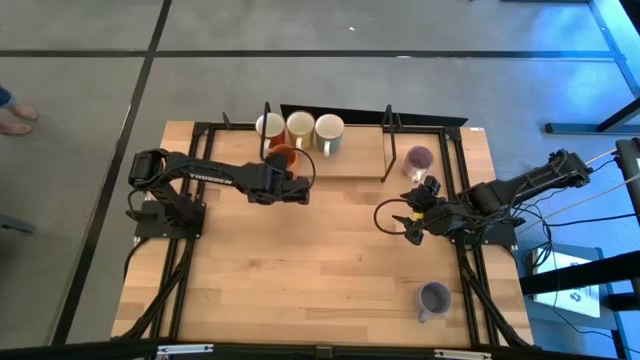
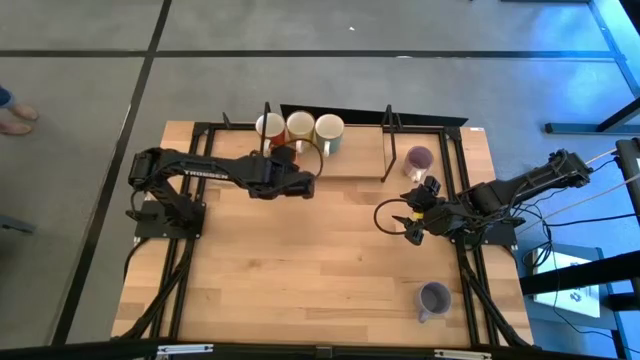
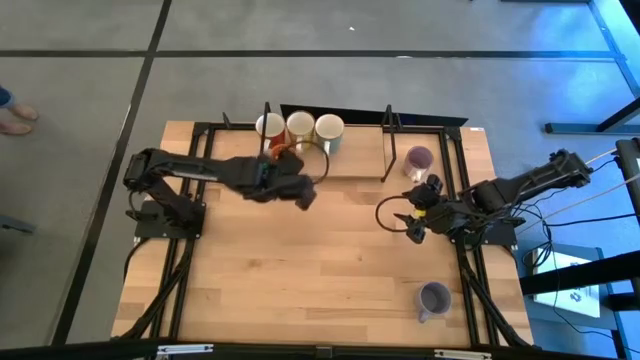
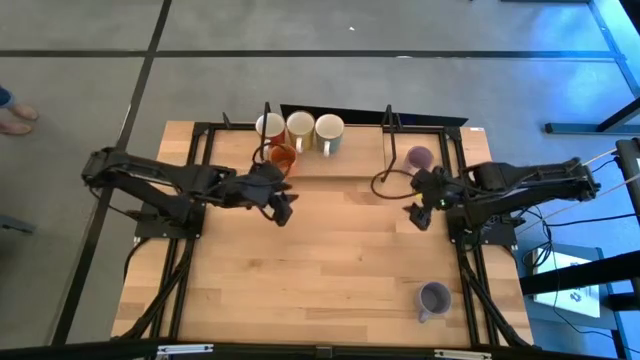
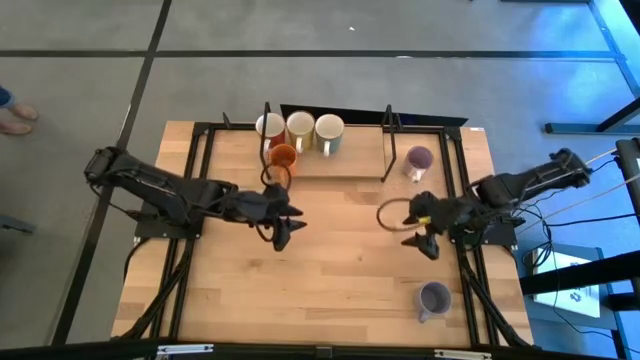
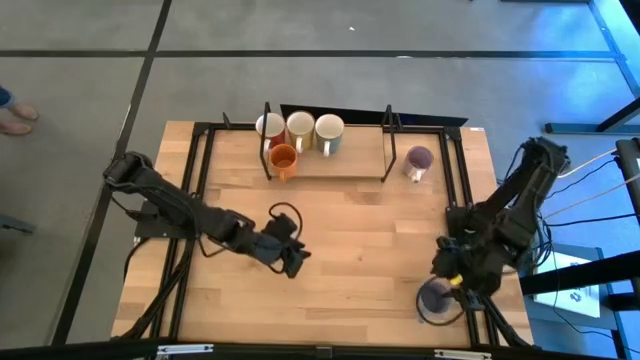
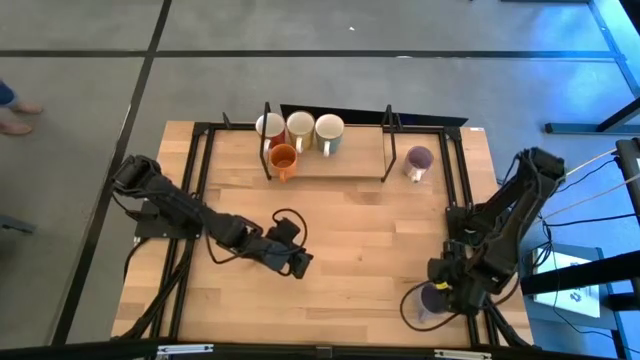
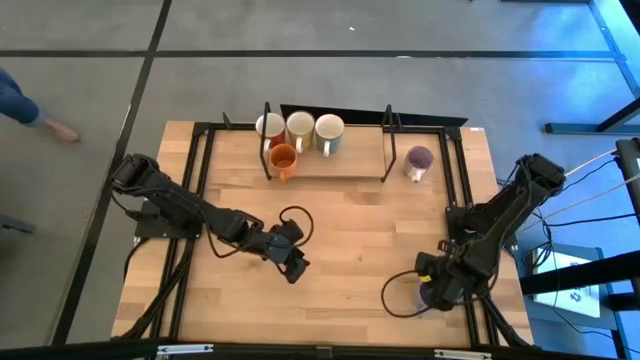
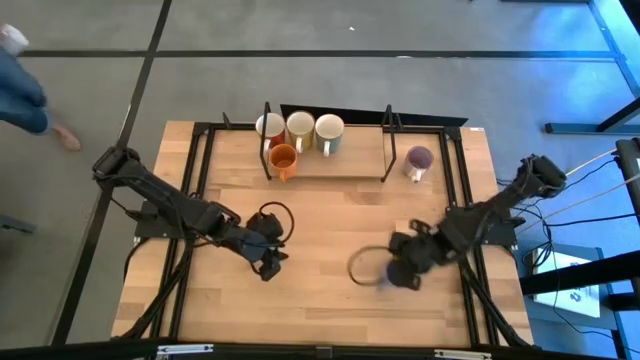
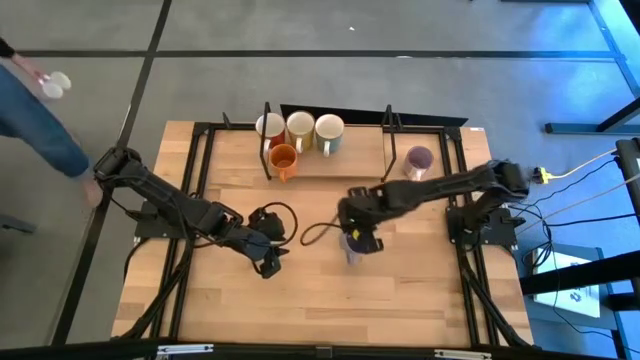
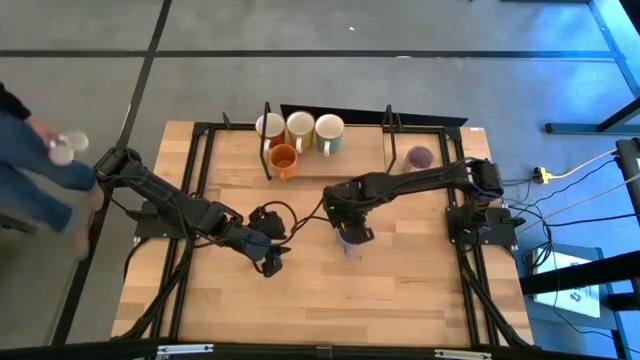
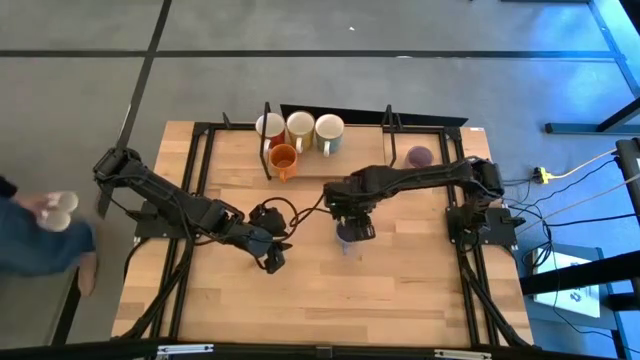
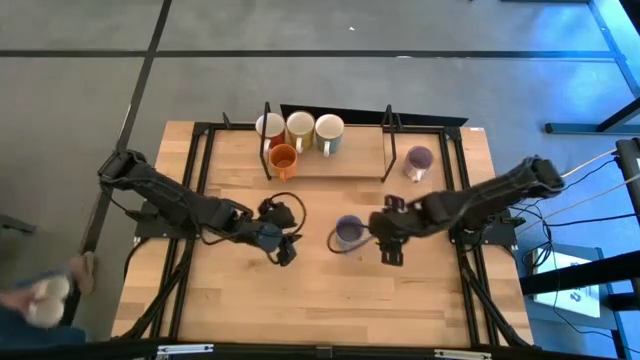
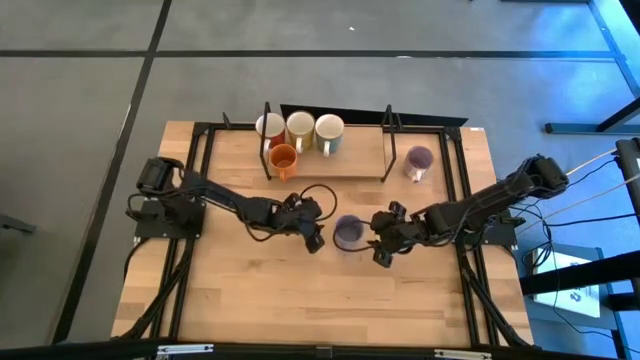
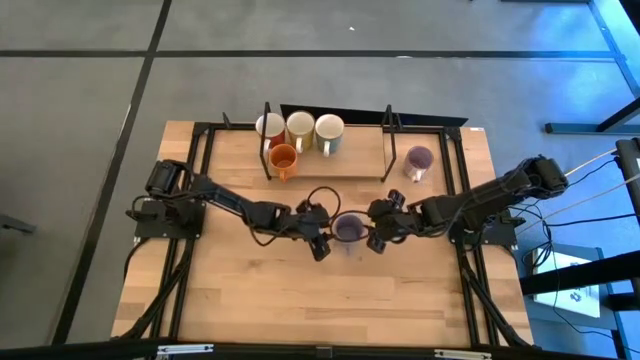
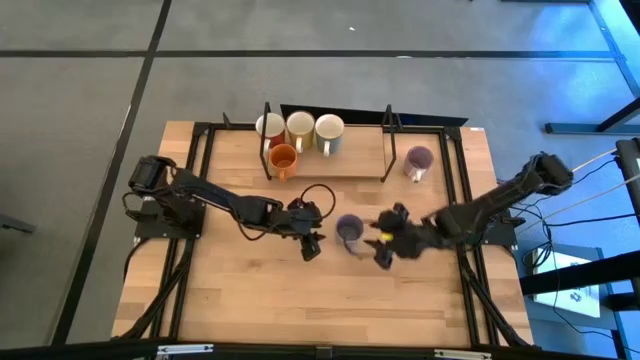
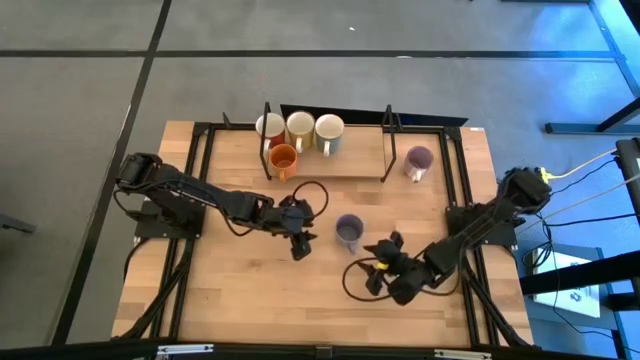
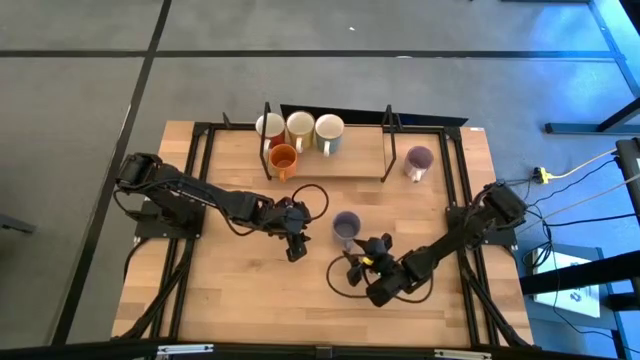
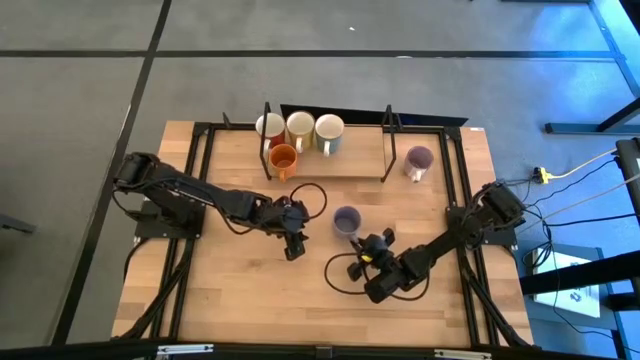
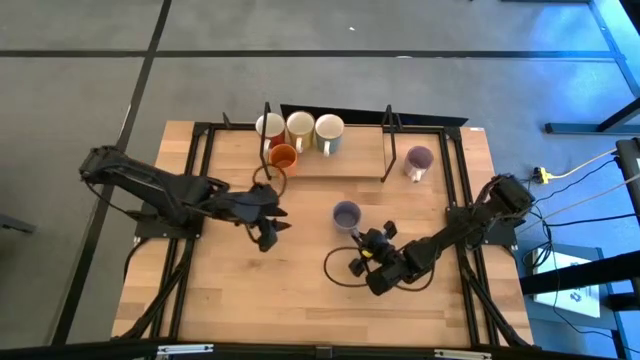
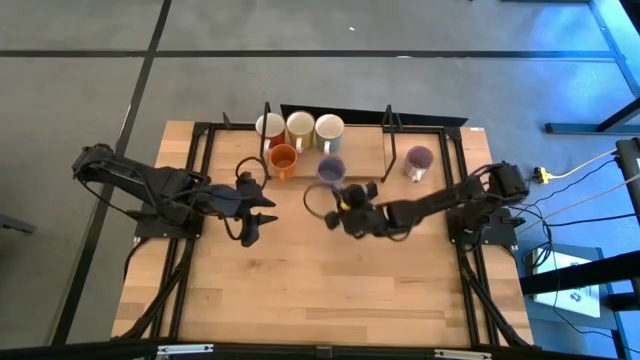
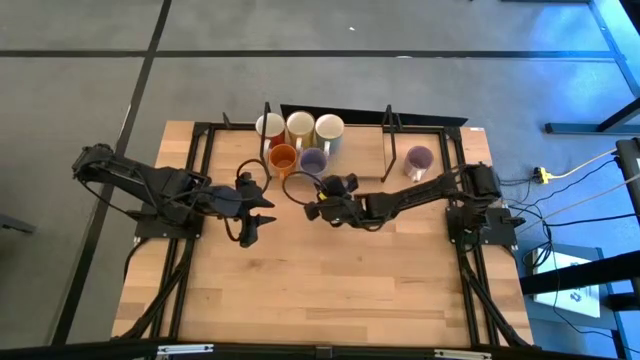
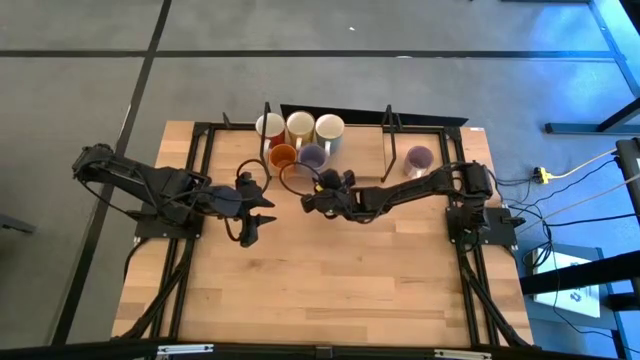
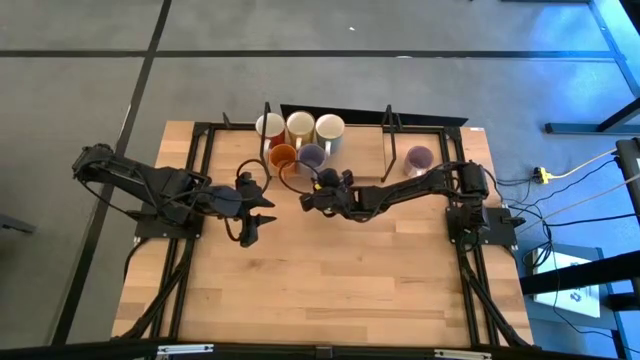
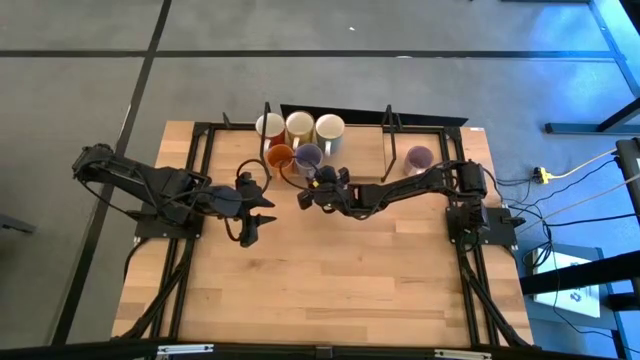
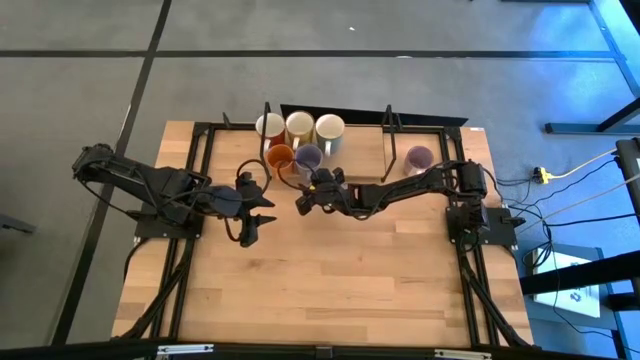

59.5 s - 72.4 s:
Task: Place coffee mugs
Put the blue mug on the shelf

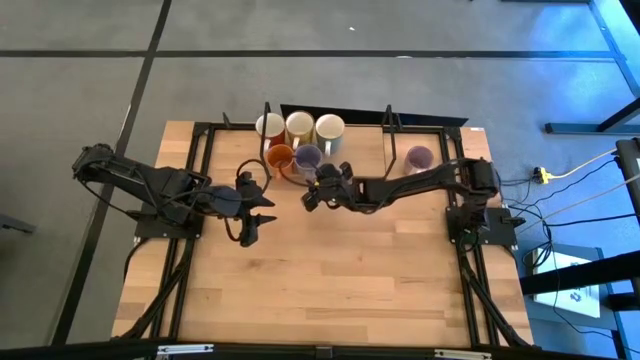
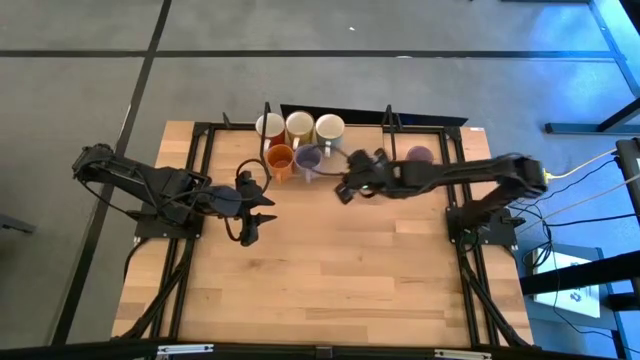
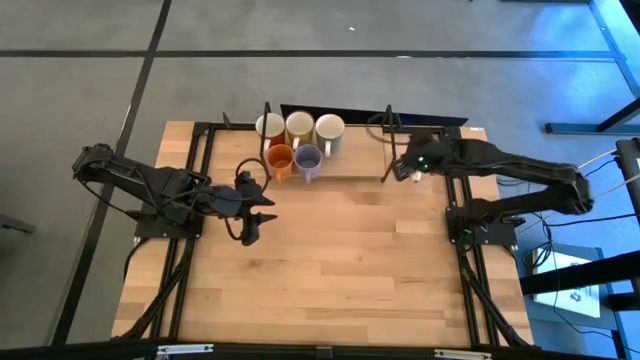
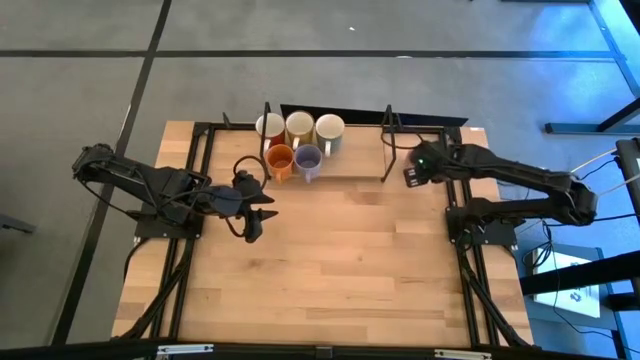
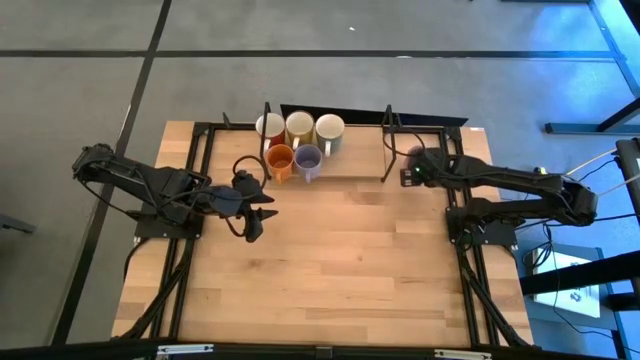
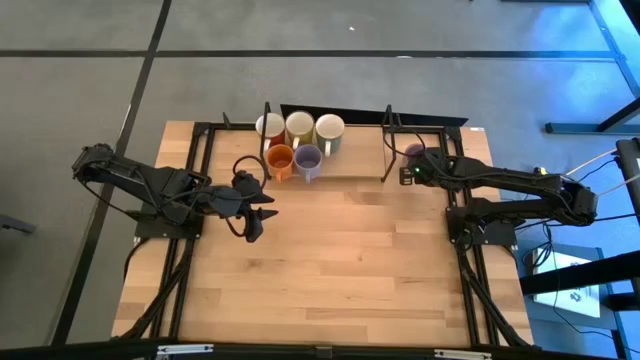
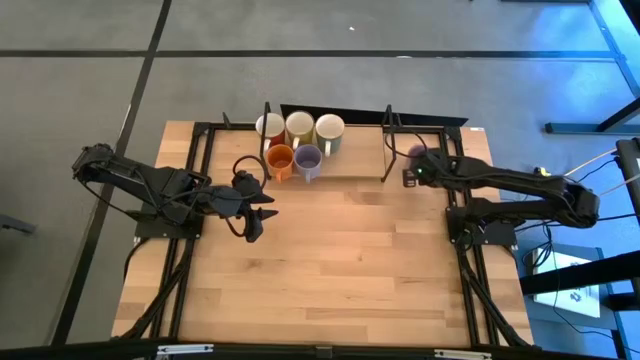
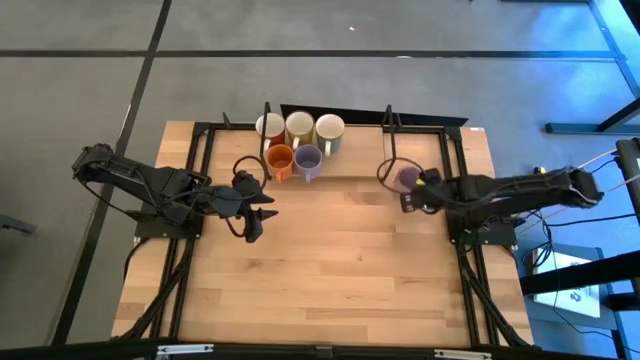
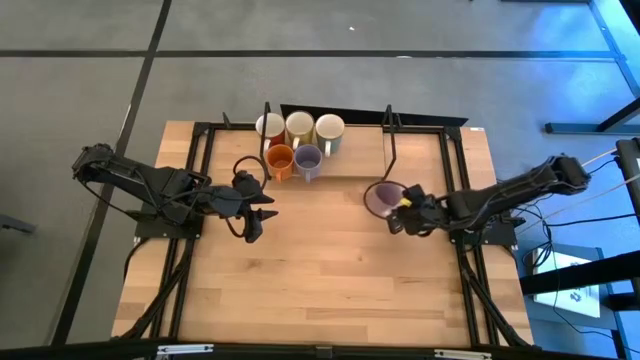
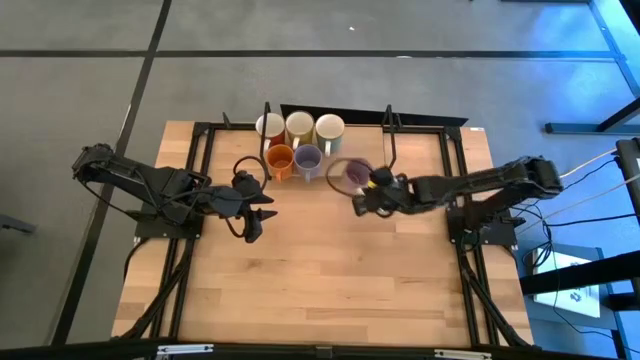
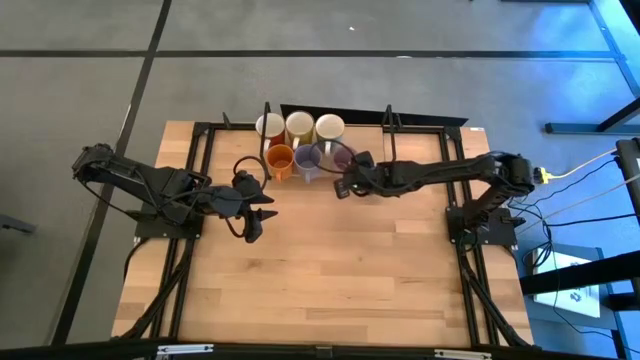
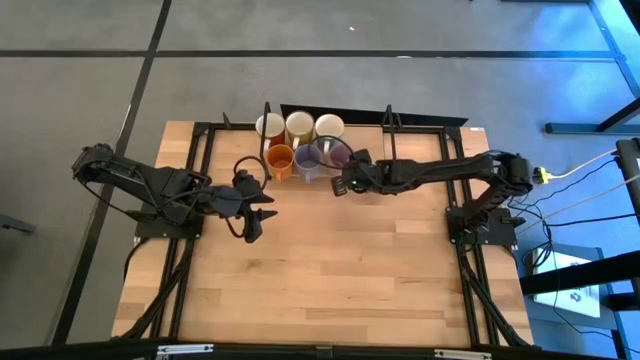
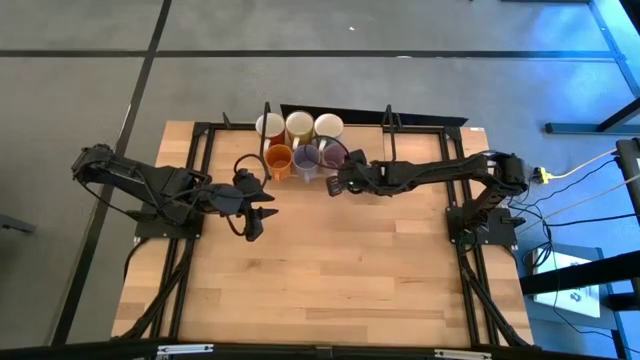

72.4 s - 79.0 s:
Put the purple mug on the shelf

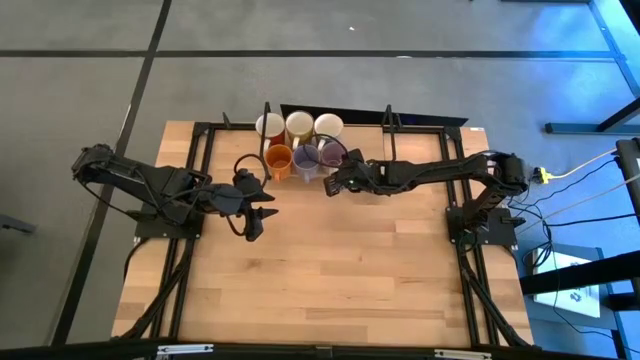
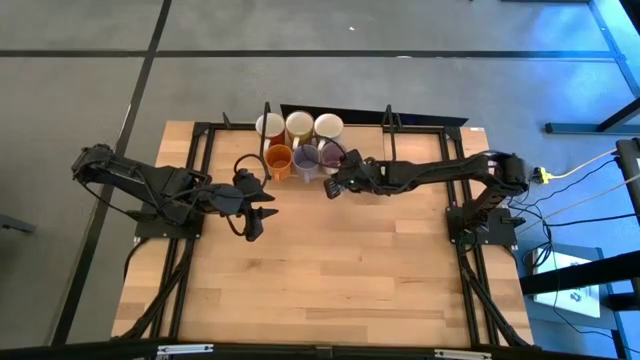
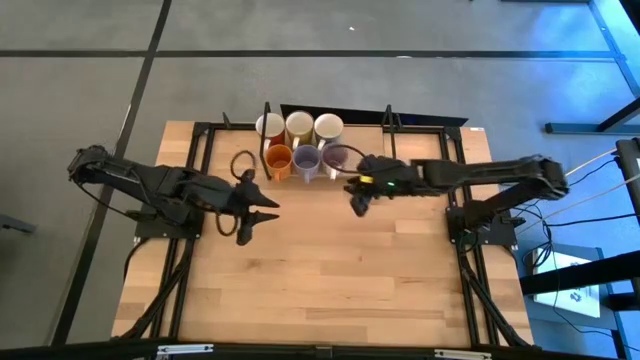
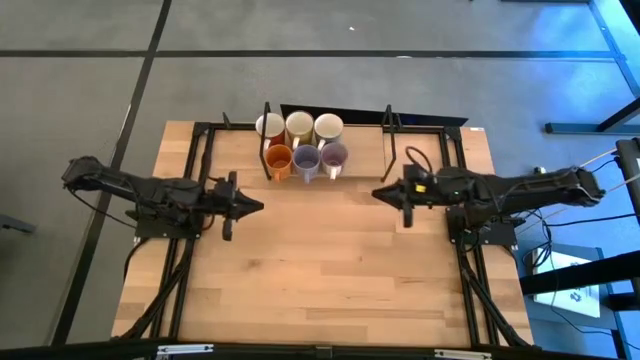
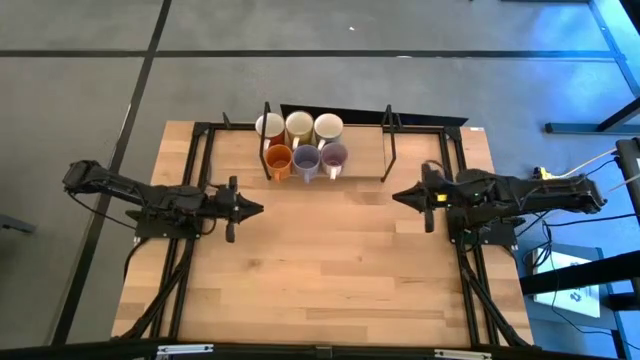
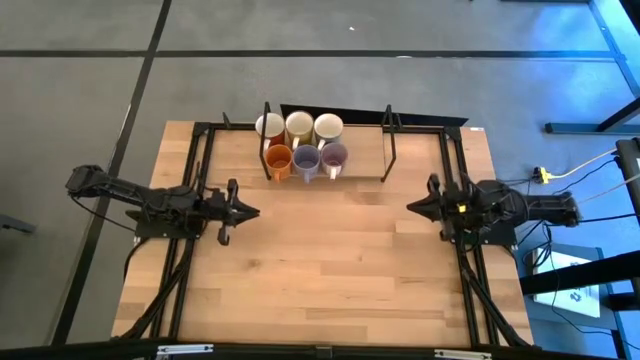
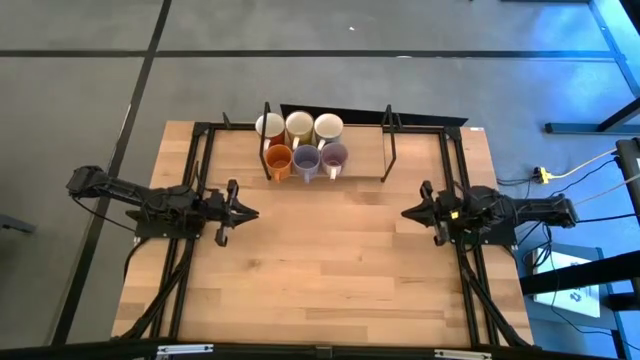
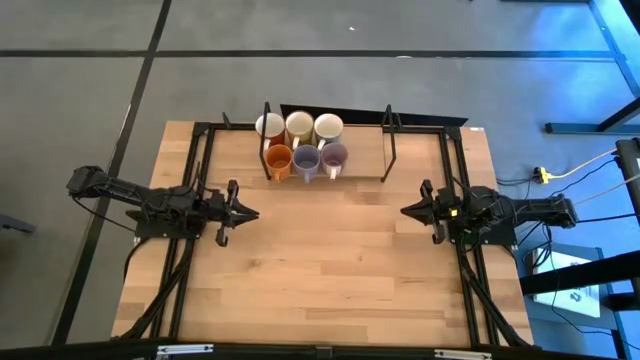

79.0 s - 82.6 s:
Return to Home Position
